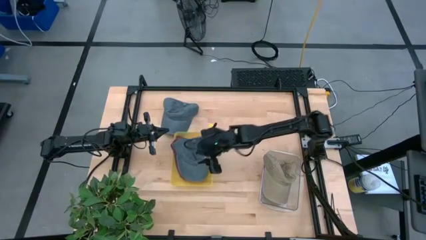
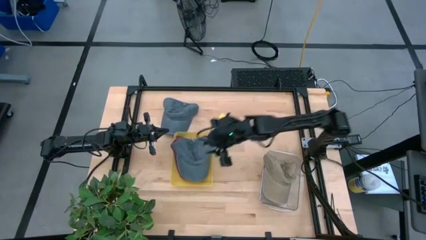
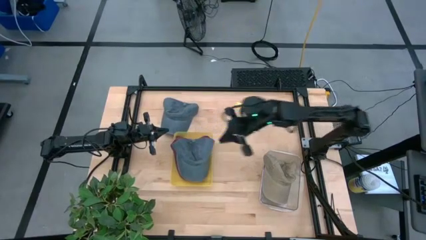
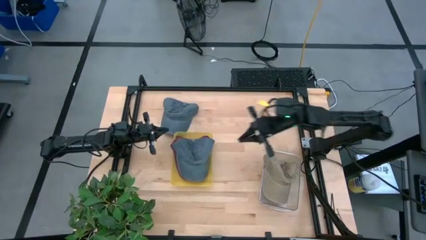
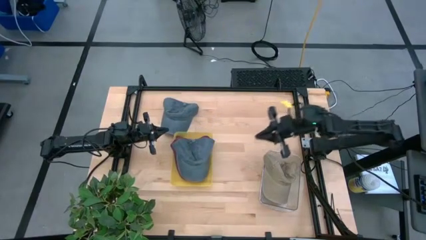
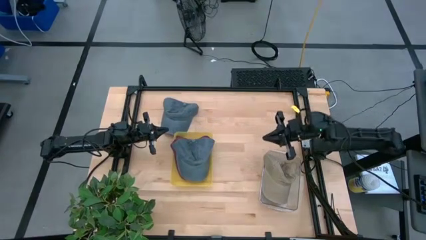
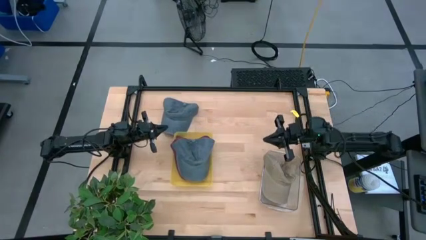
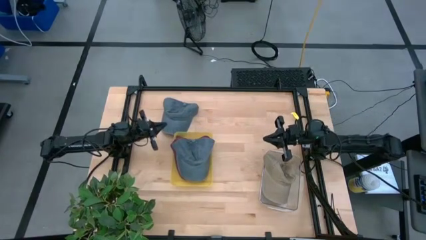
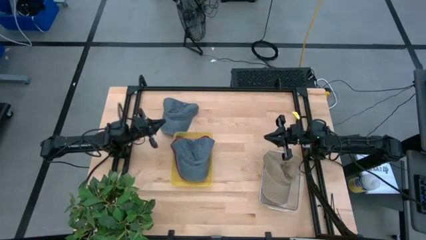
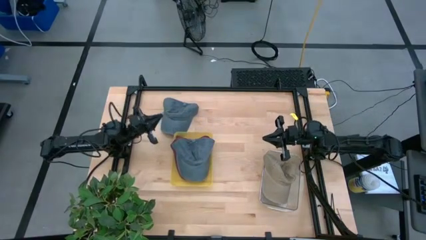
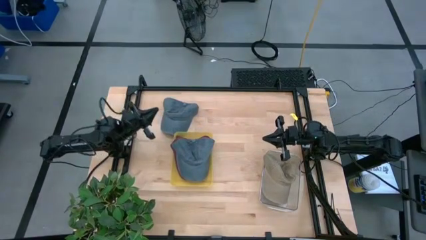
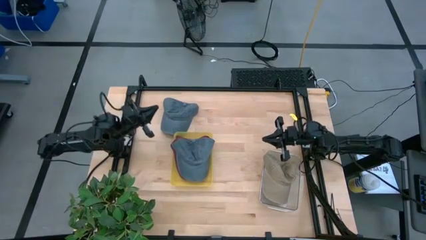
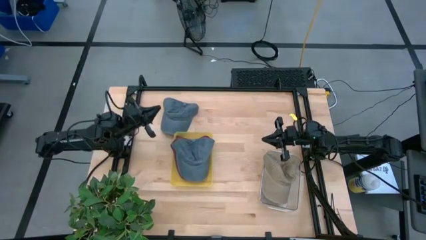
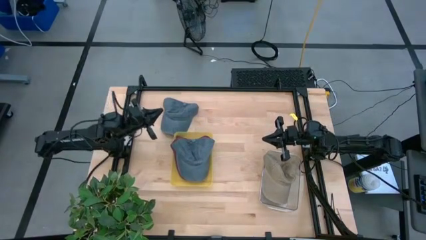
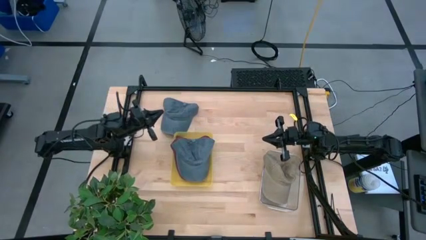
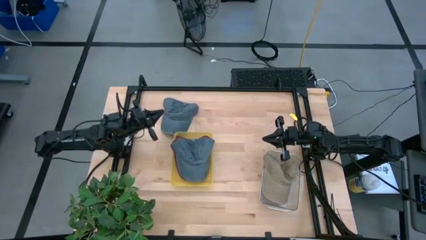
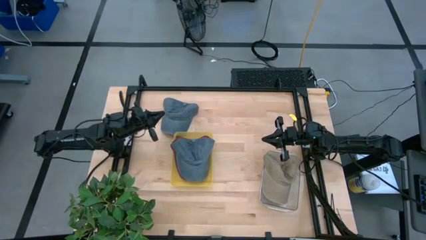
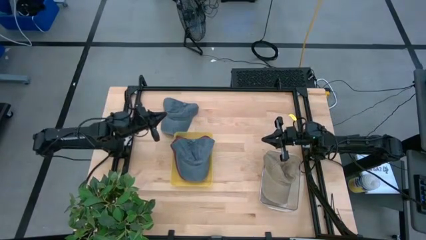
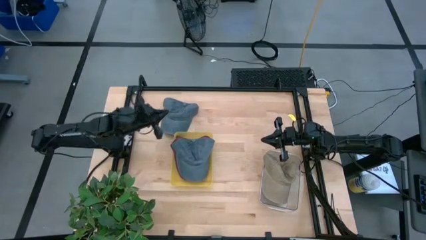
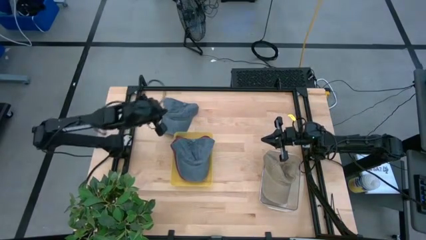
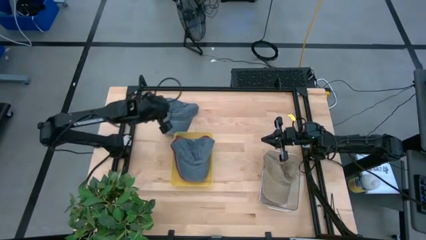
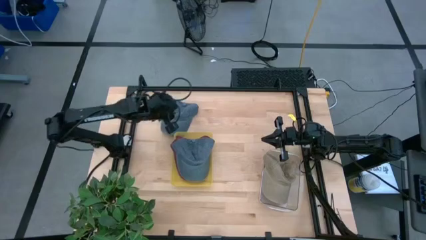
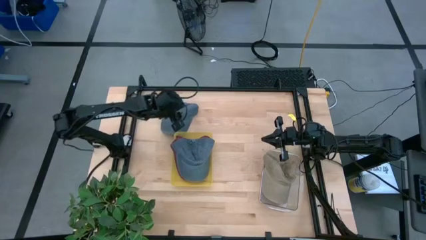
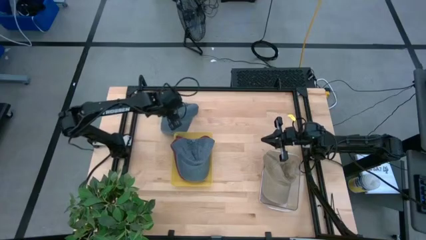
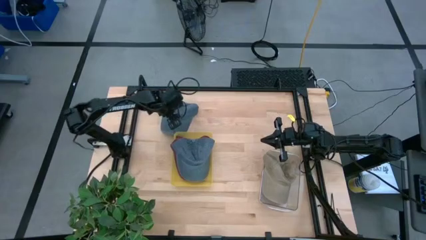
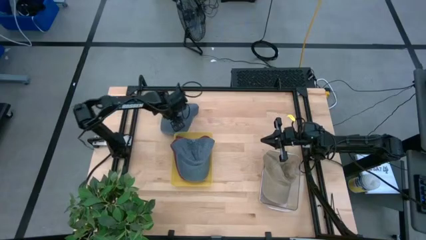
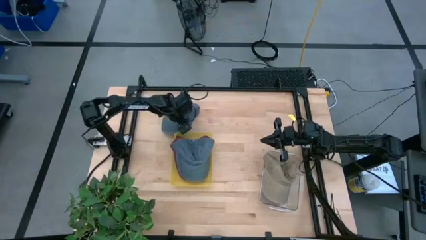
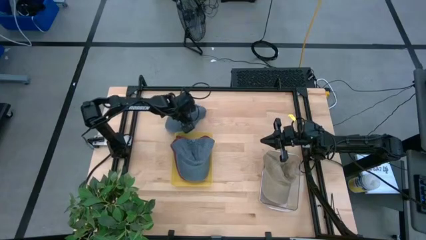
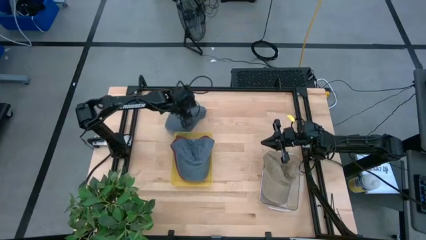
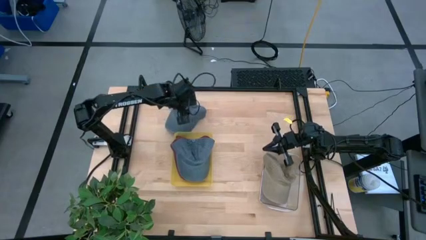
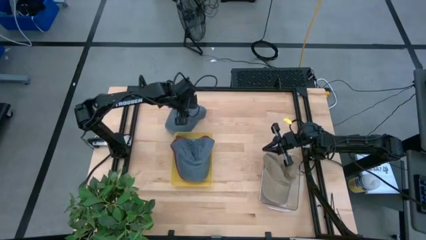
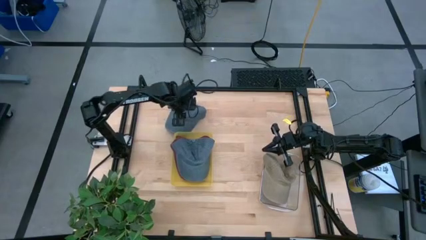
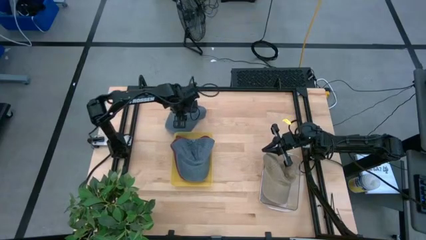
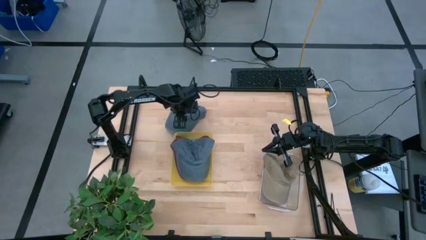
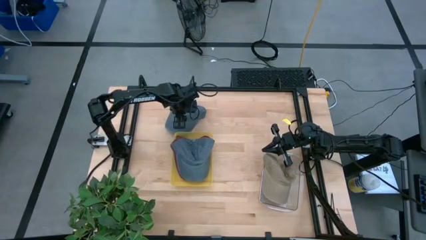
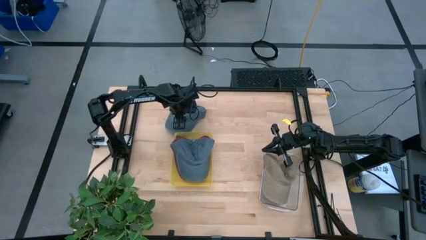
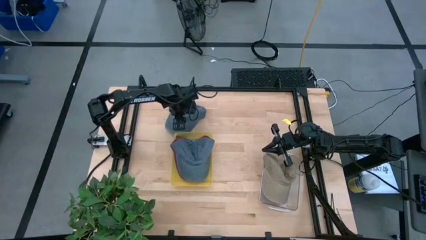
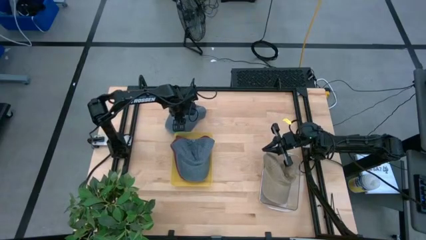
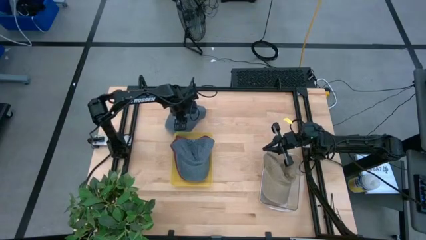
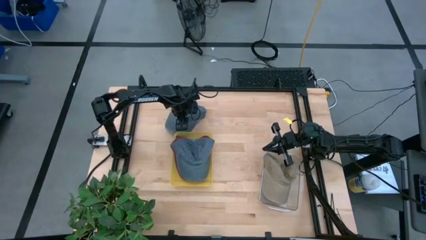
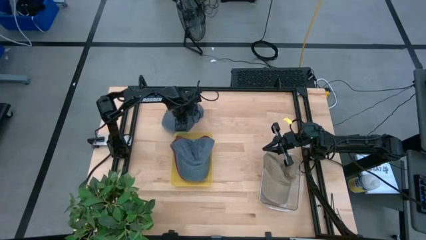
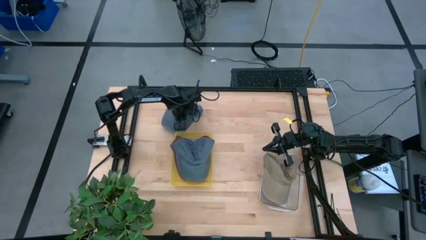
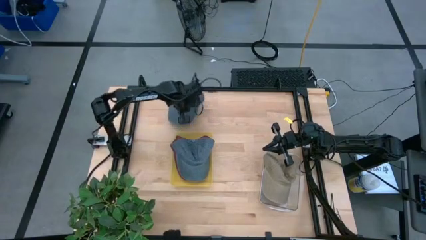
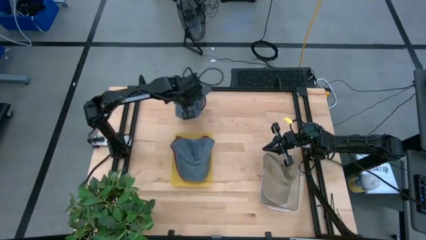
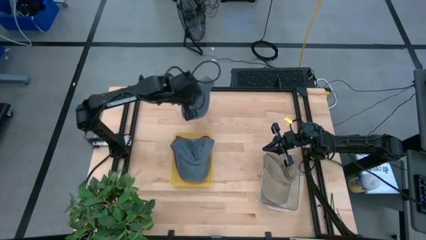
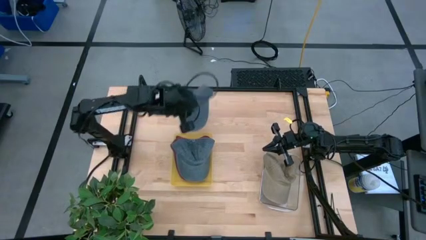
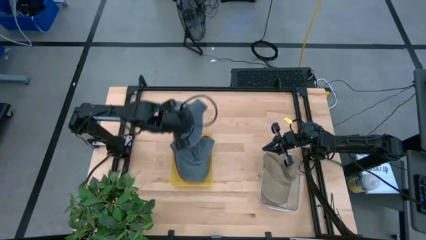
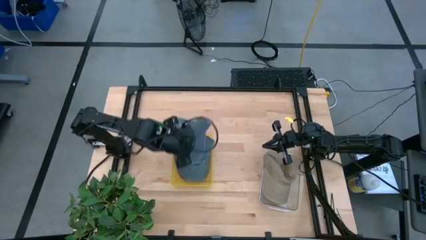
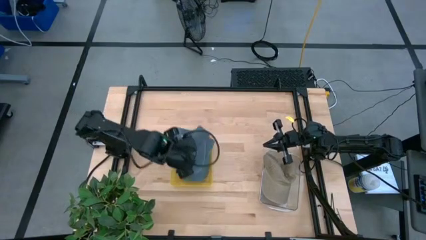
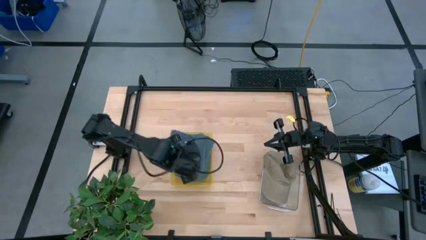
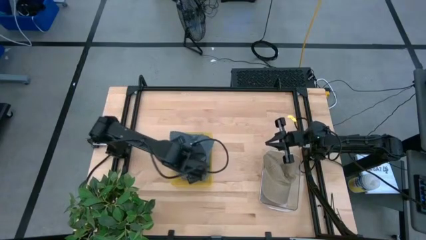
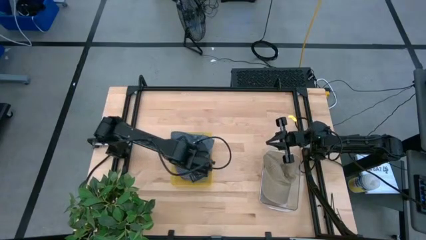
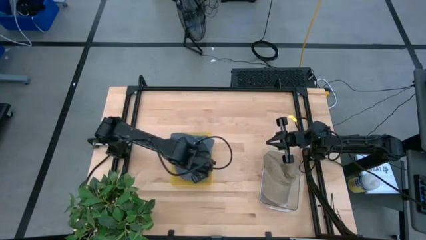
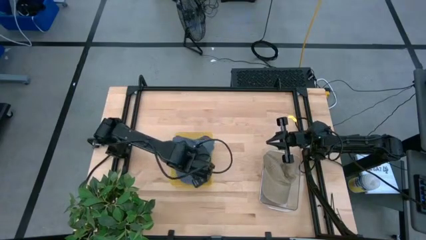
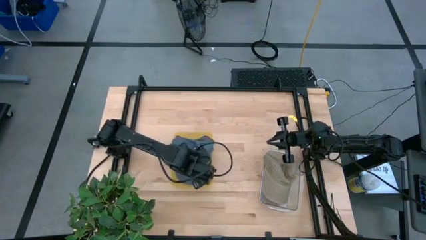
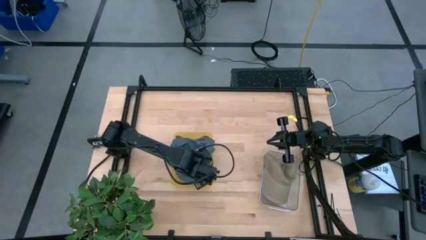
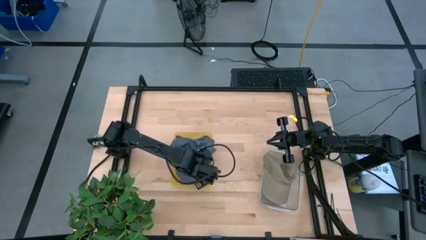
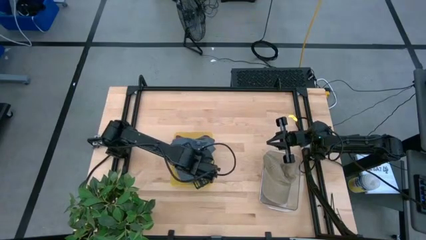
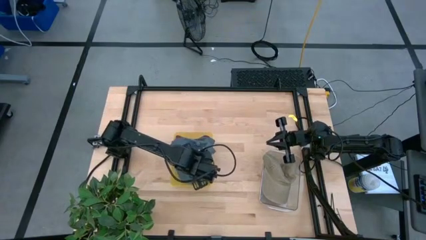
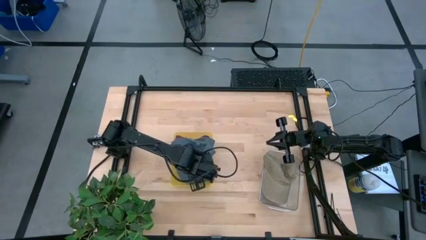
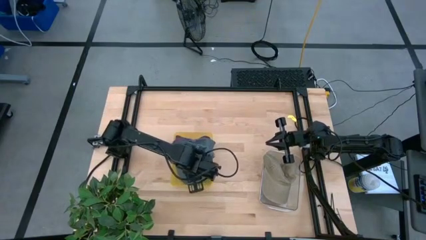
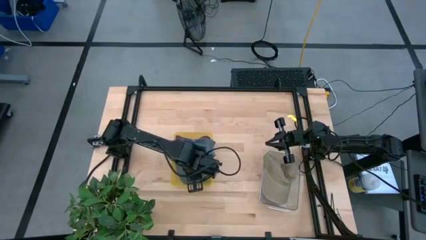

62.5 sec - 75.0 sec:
Task: Pick & Place hat
Put the blue cap into the yellow bin

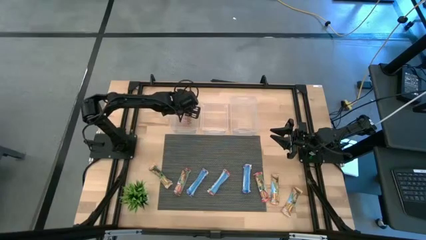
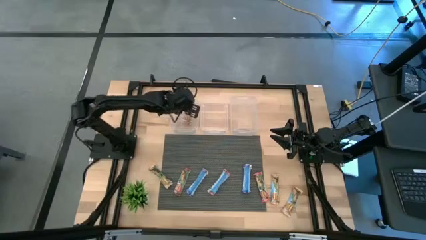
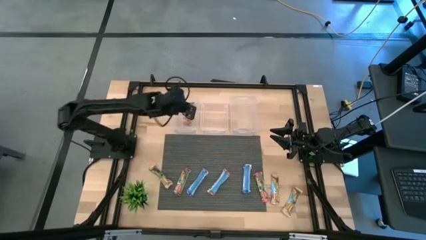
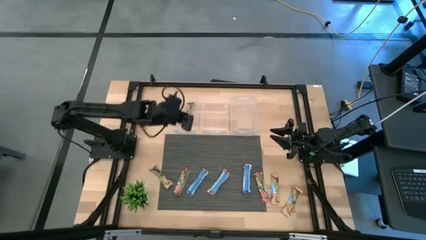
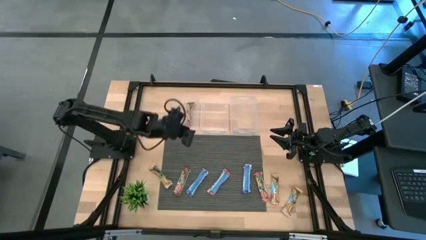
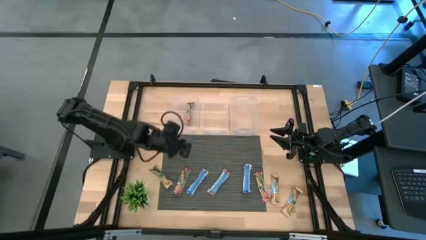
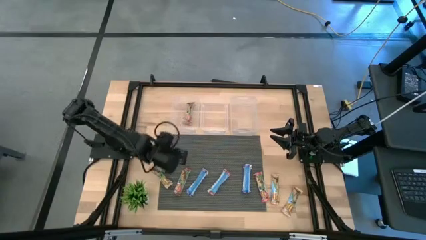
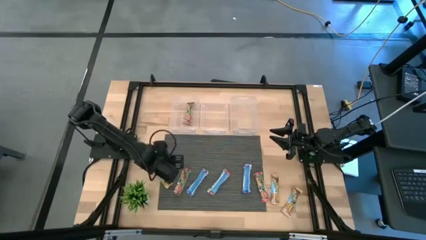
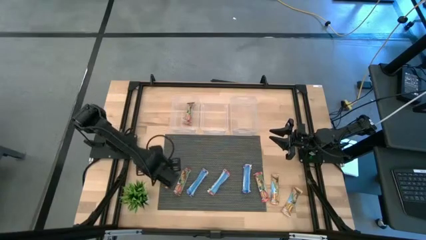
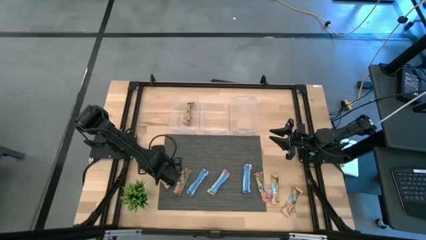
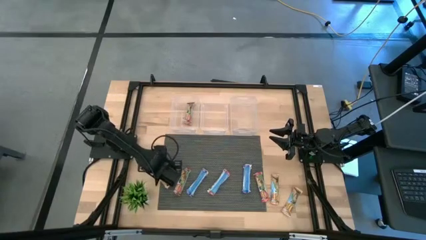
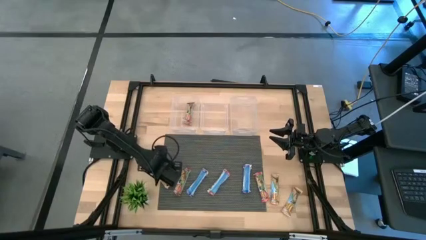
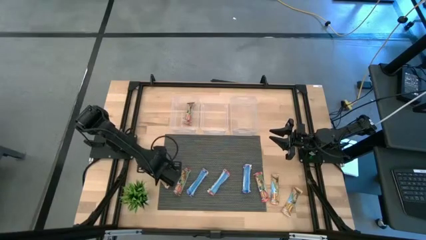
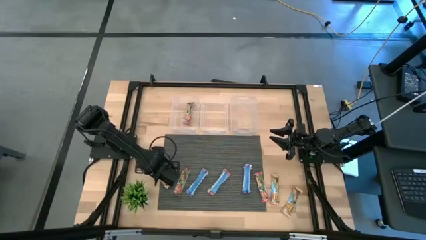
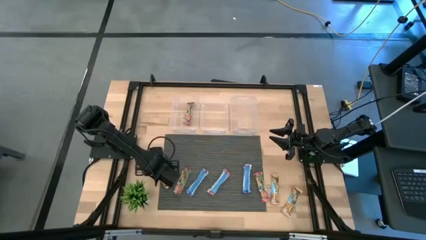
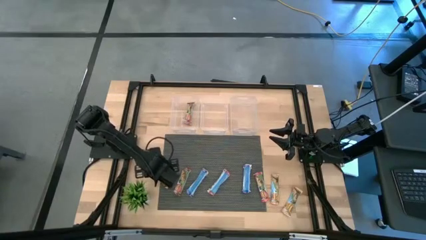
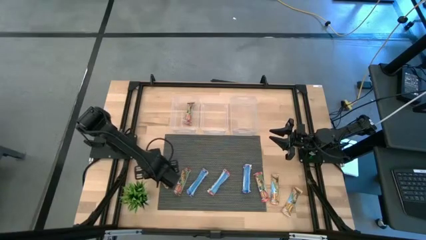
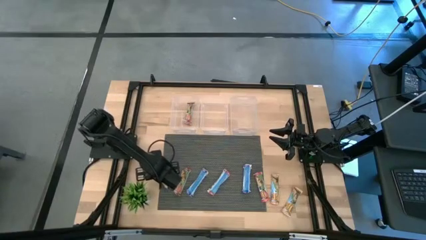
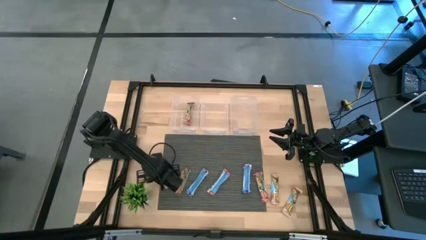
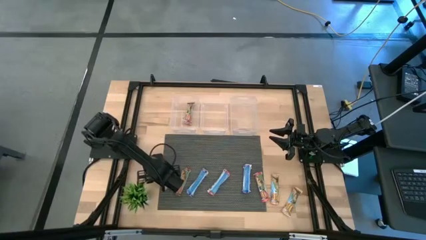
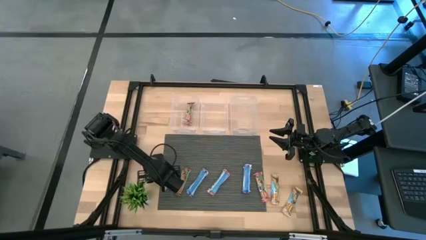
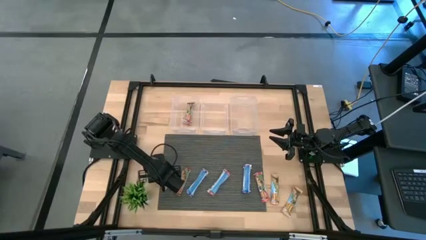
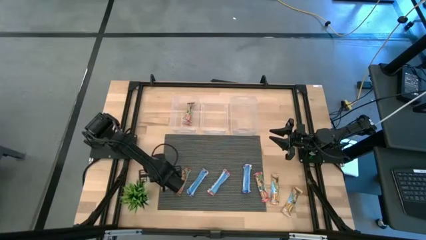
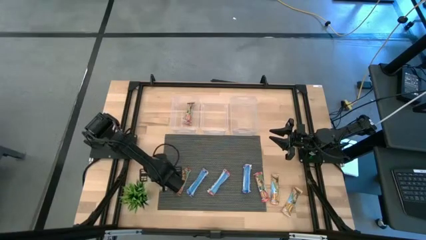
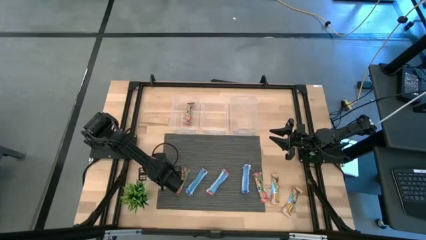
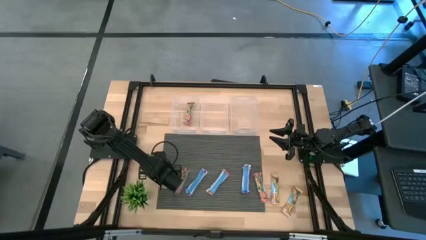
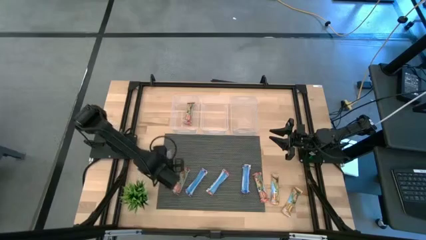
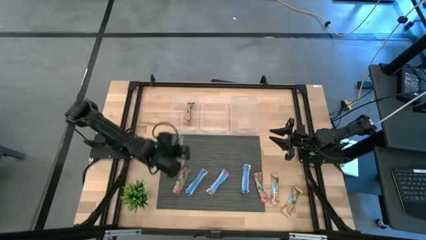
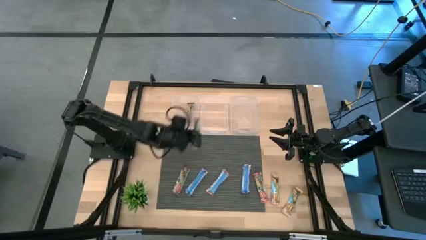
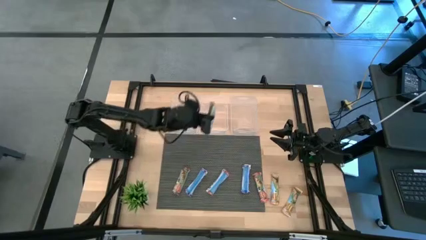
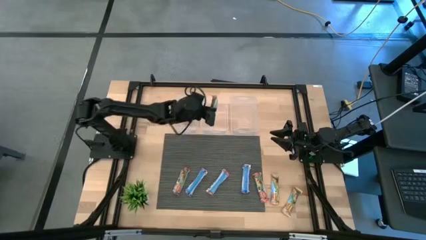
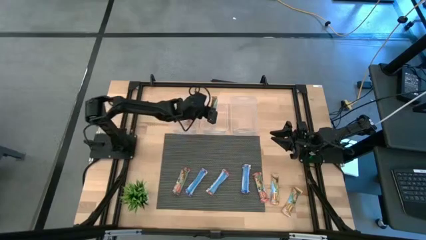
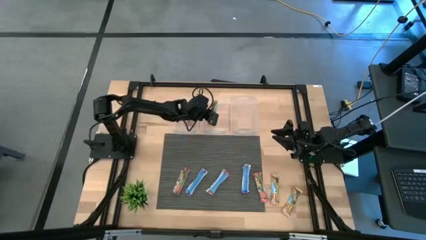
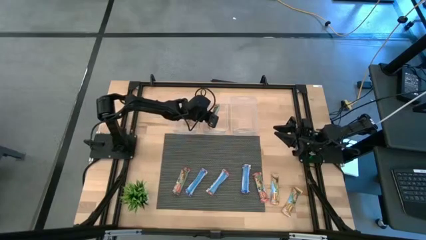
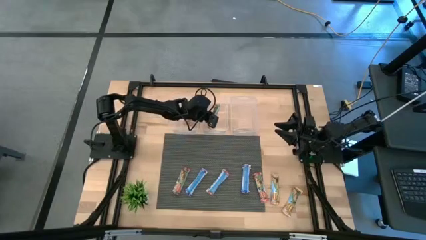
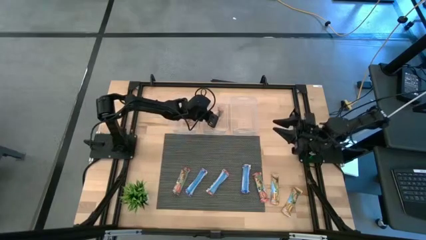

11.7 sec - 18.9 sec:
Task: Pick and place Granola Bars by type
Put the left orange granola bar into the middle transparent bin
